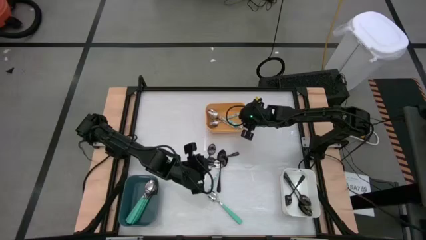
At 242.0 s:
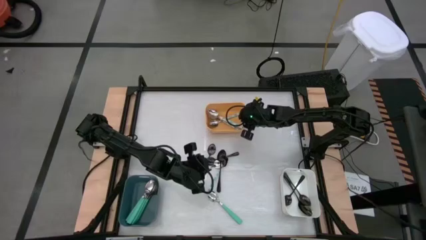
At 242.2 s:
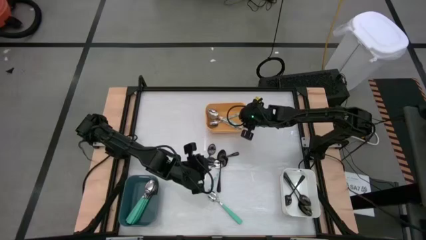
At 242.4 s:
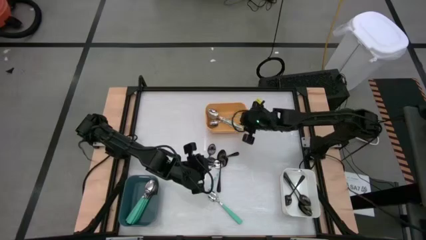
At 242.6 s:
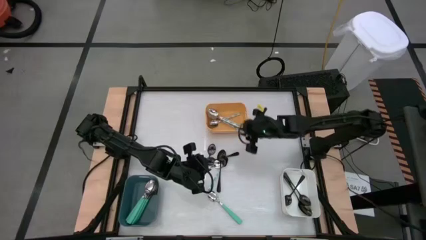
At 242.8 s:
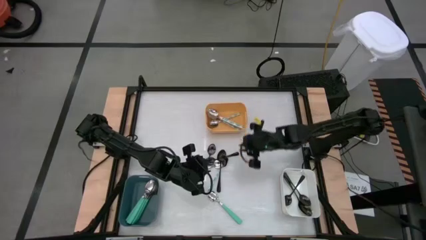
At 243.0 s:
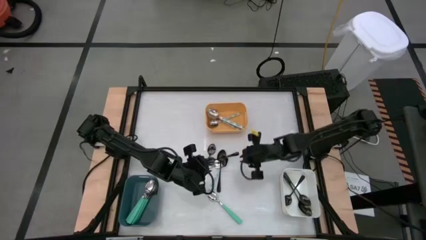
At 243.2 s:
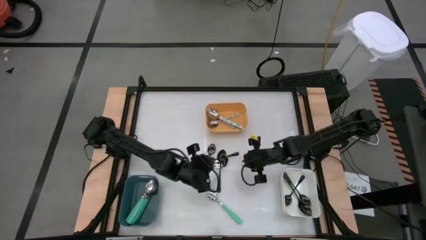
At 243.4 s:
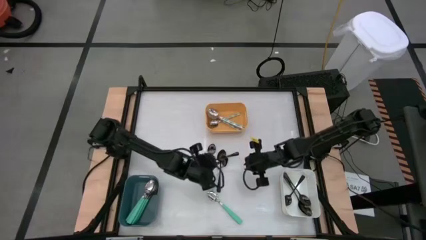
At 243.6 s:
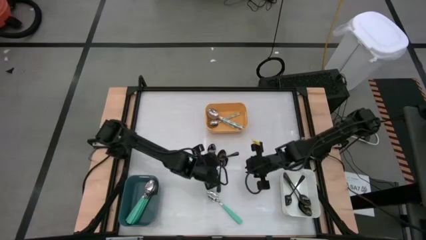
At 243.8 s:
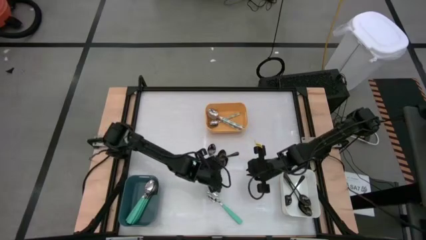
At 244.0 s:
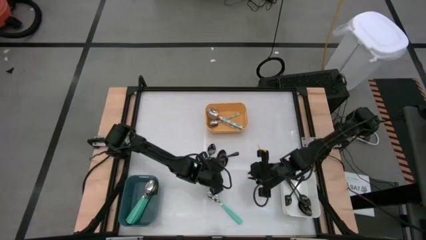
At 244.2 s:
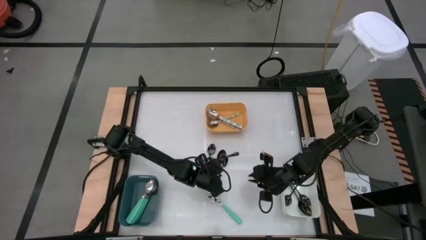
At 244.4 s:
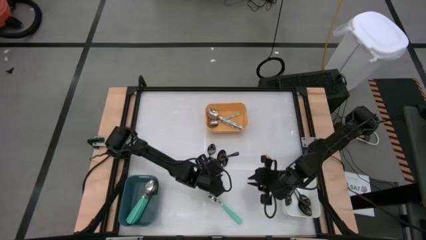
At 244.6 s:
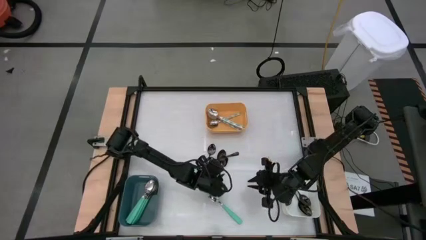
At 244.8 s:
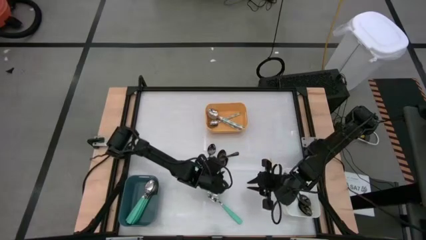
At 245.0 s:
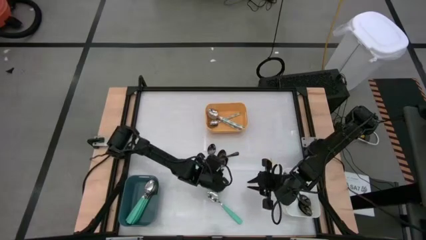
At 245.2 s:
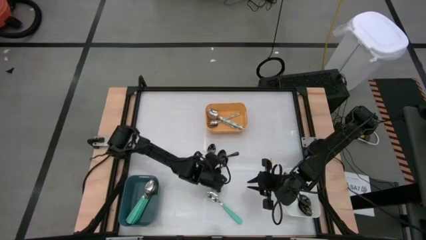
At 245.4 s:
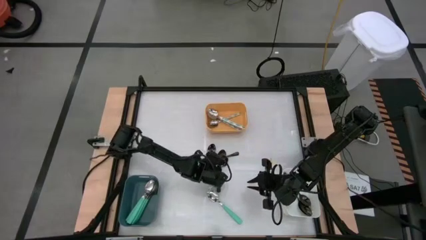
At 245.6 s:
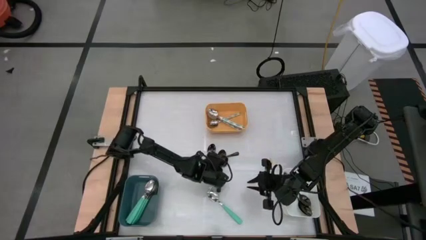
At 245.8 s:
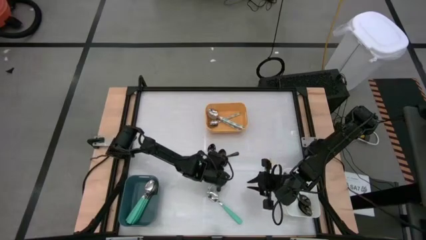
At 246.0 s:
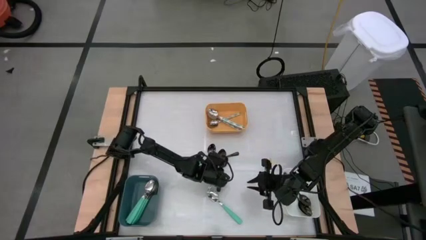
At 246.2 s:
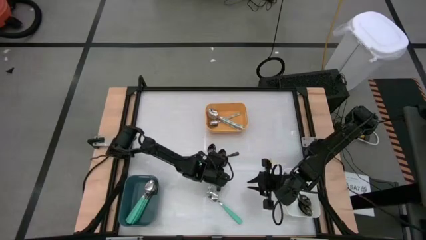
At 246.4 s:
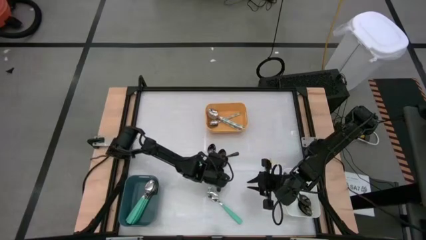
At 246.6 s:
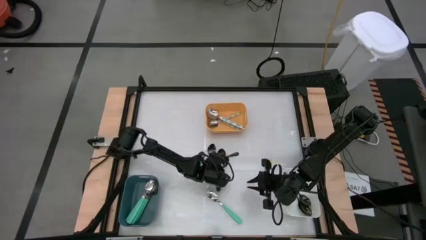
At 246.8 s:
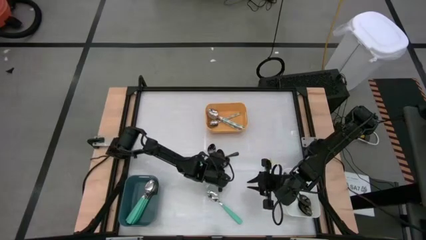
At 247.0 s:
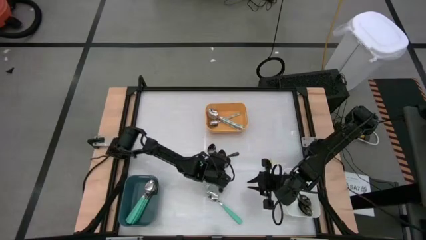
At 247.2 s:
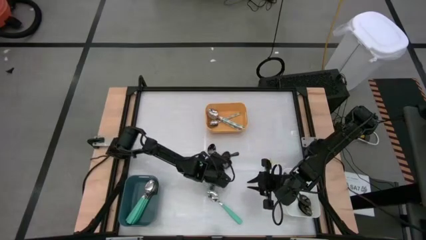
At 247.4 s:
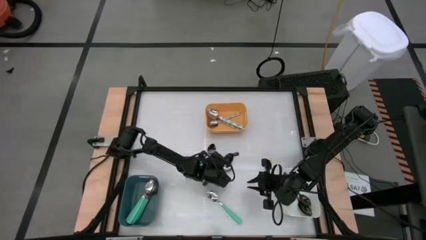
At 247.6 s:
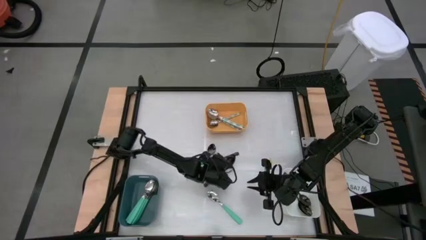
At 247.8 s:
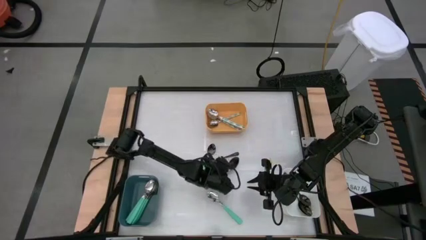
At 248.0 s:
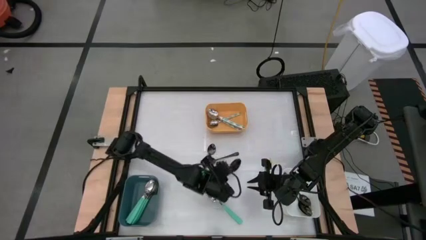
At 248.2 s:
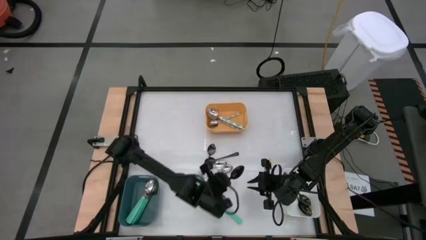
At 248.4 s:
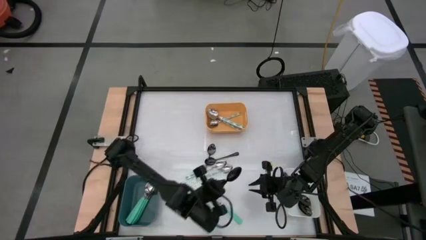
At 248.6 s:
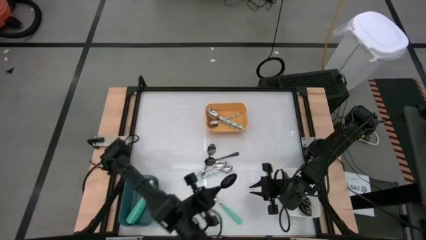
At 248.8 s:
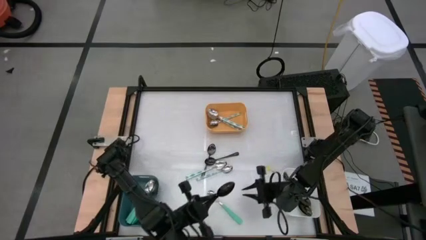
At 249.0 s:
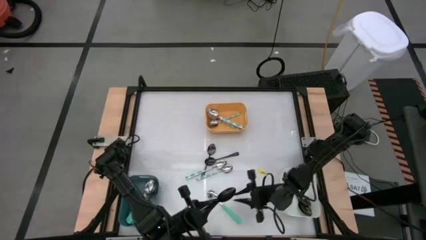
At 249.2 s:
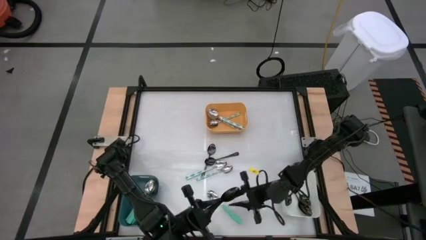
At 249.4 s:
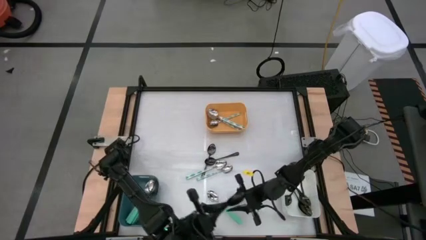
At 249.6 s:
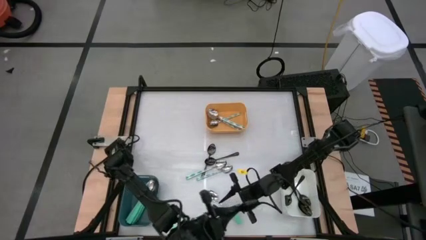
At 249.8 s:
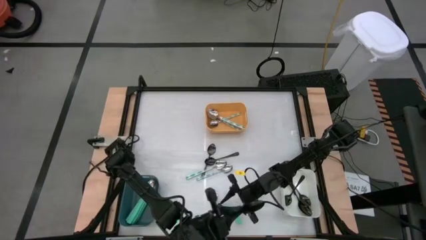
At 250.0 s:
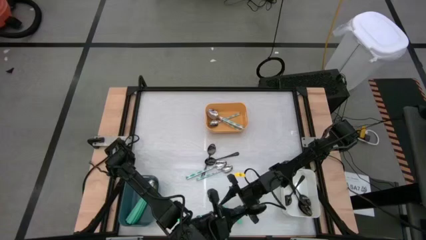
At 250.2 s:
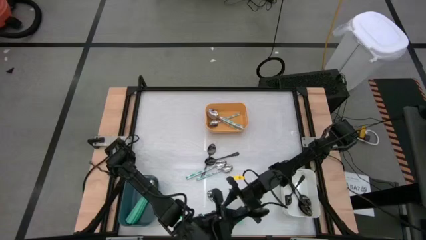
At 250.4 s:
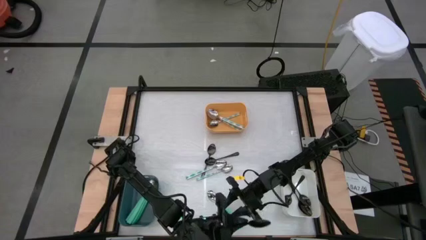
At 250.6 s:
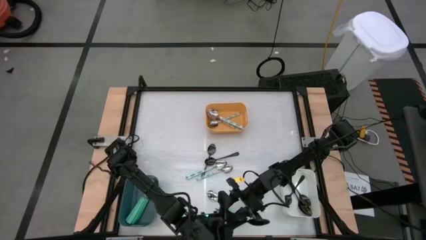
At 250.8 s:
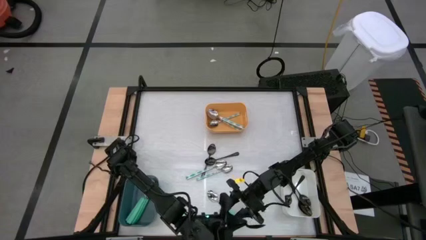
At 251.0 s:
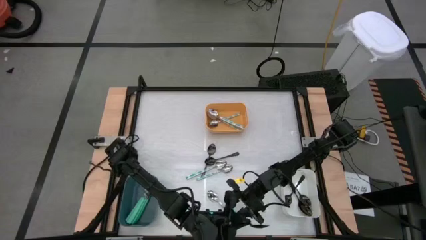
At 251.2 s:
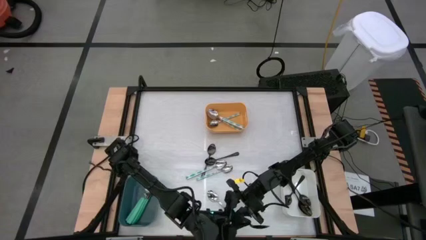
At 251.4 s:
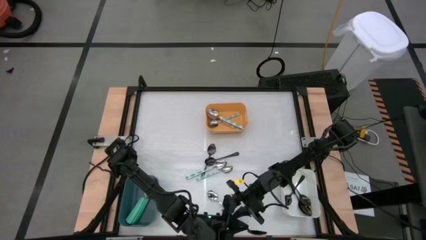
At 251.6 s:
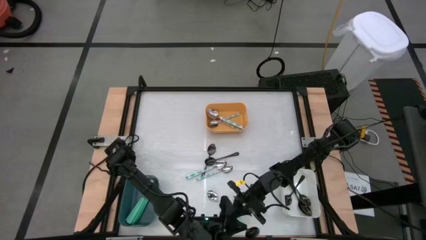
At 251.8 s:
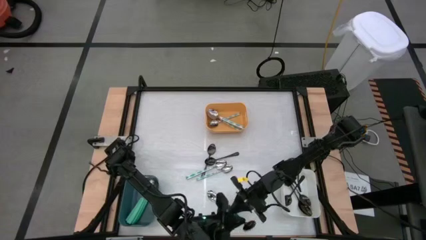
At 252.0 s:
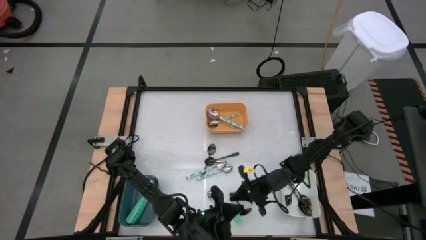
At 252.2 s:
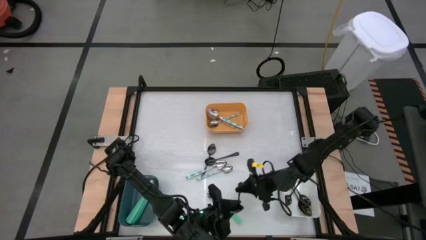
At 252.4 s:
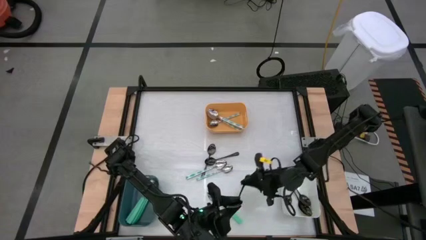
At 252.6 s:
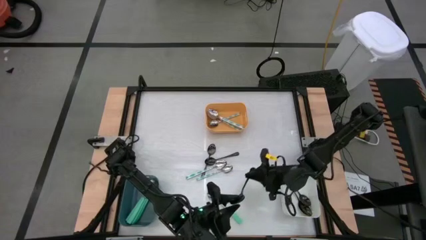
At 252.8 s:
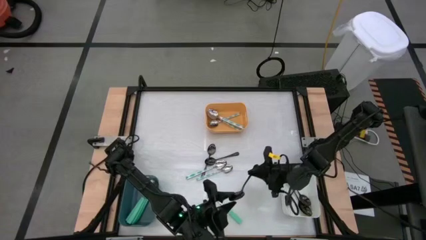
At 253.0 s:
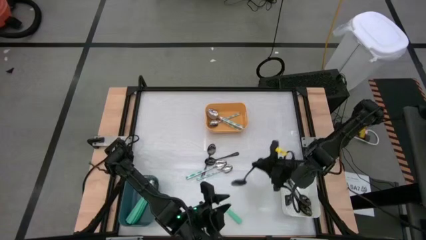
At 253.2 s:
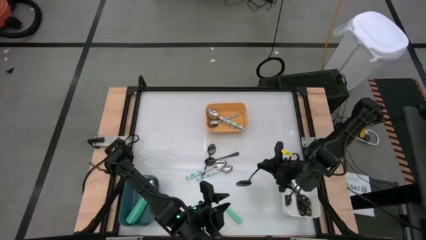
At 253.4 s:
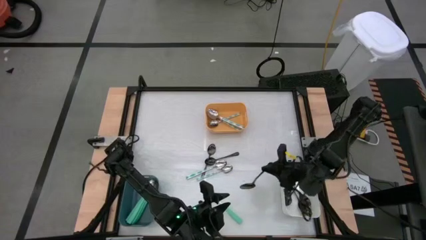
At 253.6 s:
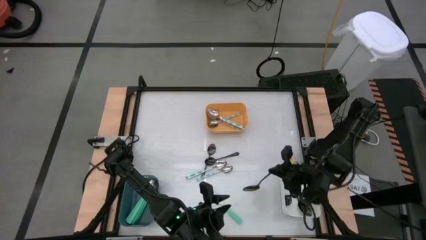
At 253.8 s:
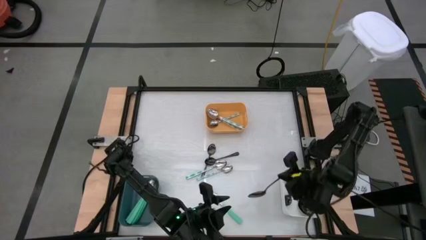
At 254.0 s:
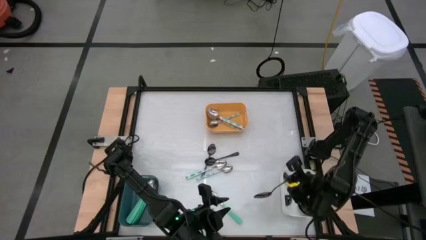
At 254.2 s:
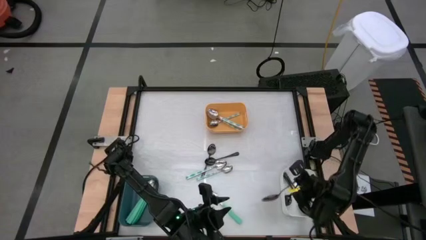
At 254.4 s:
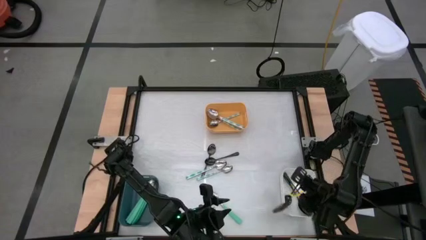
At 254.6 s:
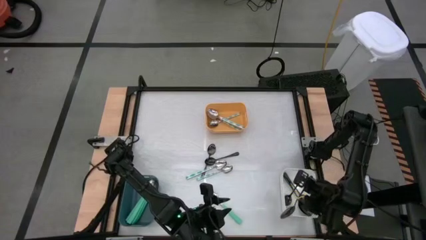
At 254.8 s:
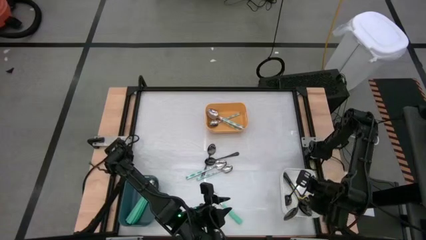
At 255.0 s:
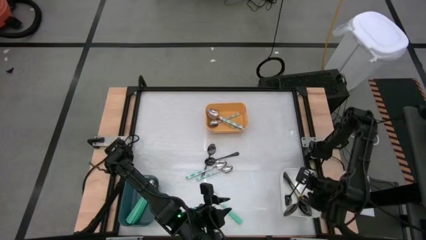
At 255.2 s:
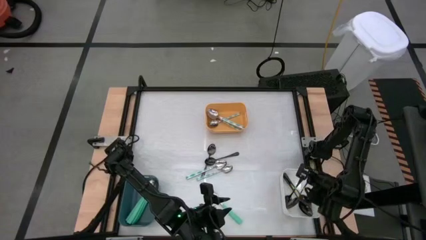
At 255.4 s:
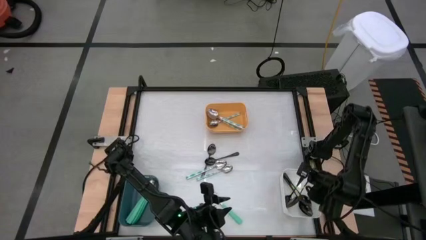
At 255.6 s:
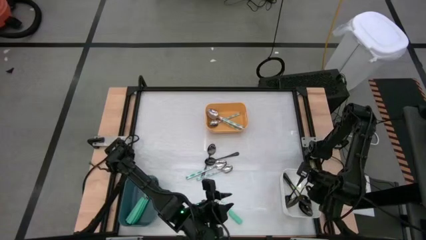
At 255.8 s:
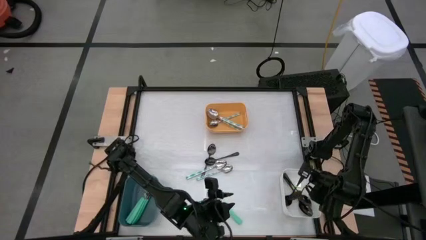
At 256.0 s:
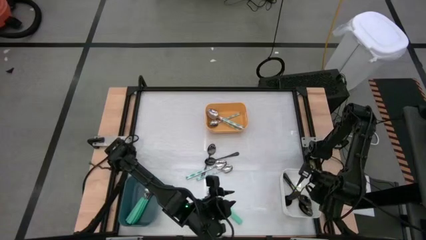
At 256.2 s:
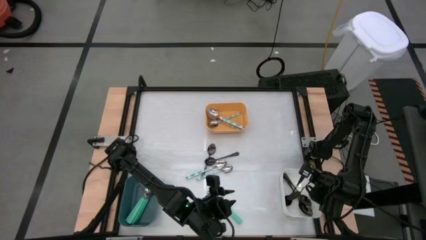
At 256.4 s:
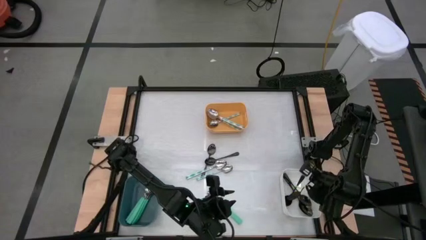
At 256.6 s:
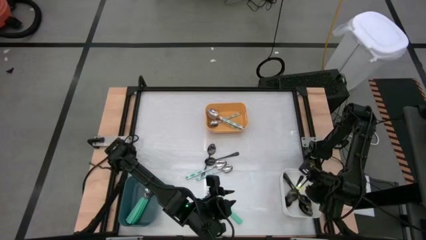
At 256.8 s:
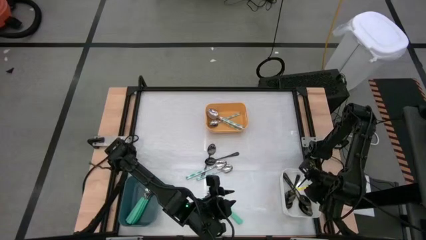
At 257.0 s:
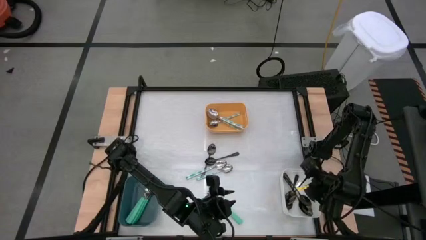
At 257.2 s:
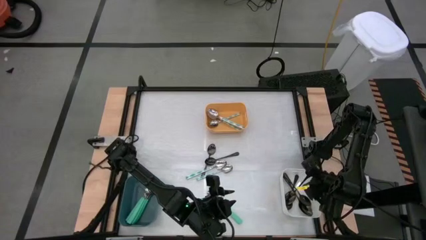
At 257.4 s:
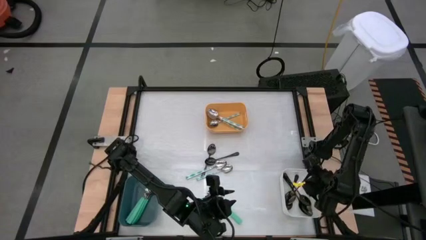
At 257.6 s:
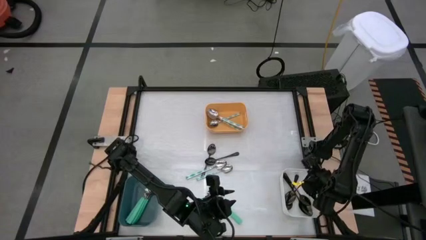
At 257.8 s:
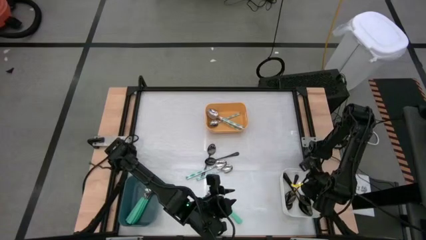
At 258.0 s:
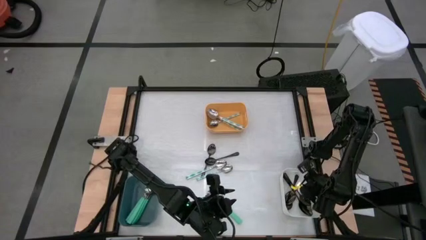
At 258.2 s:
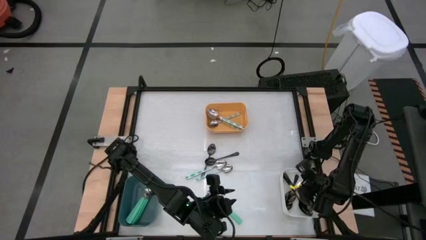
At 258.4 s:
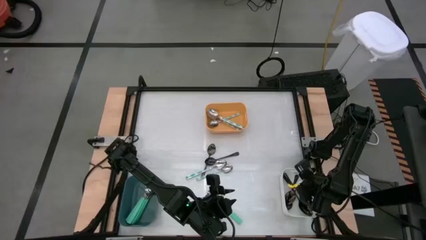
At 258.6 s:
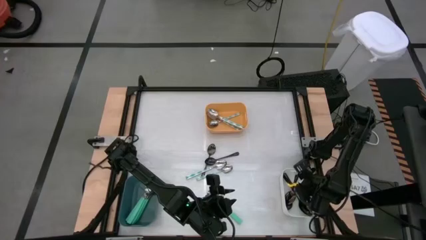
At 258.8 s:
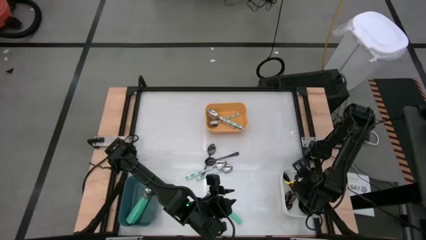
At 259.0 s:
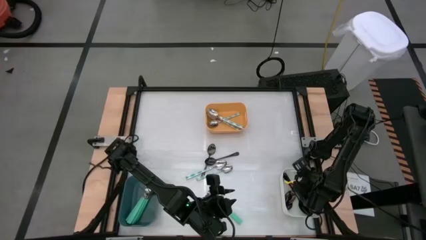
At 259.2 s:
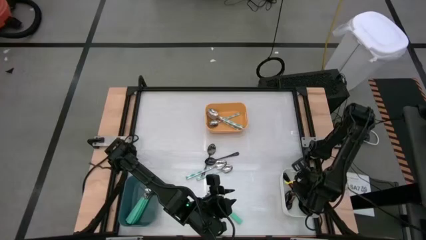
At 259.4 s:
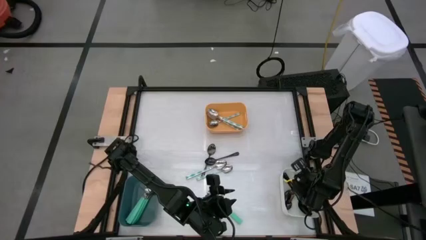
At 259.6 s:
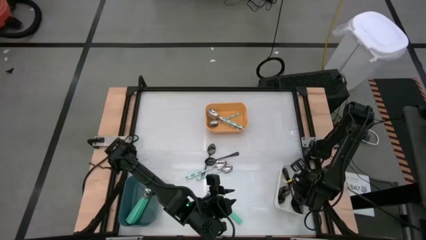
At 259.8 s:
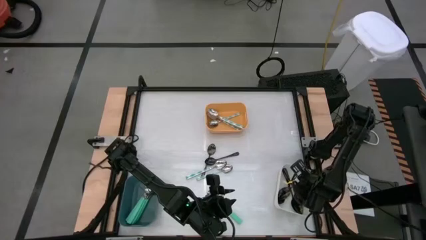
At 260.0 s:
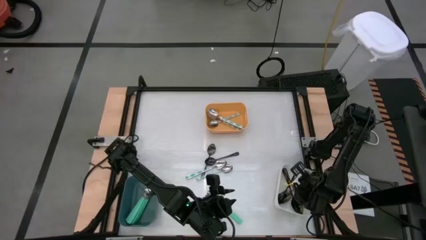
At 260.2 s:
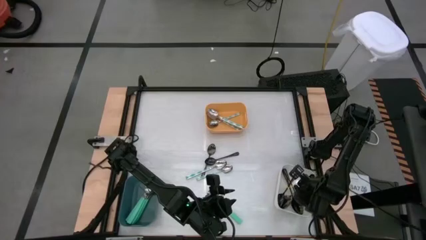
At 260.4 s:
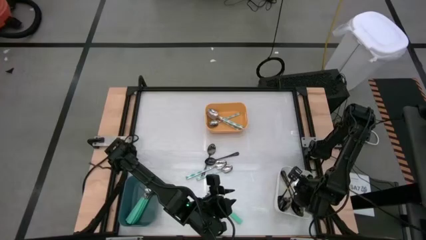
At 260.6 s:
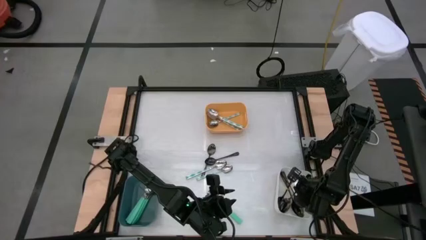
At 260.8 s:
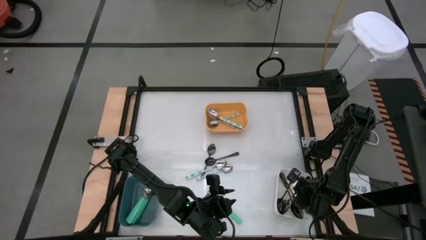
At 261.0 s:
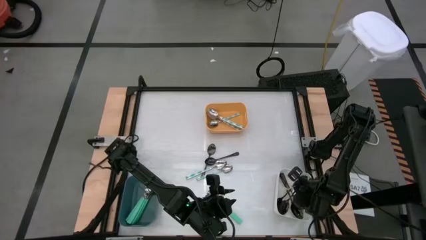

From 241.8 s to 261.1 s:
Task: Sort silverware by color (type)
Put the black spoon into the white bin
